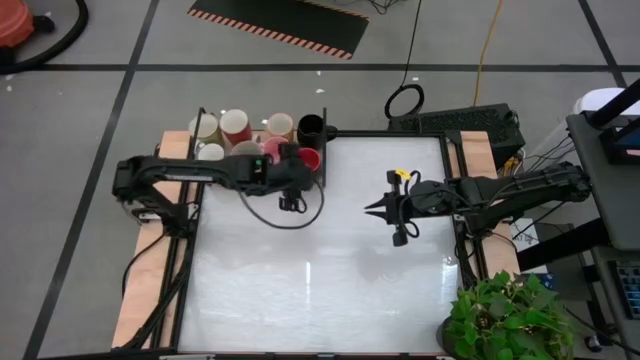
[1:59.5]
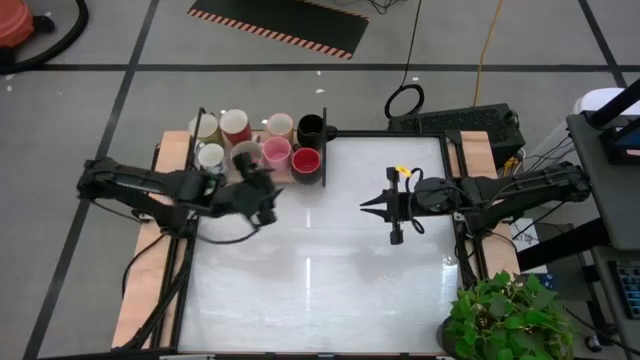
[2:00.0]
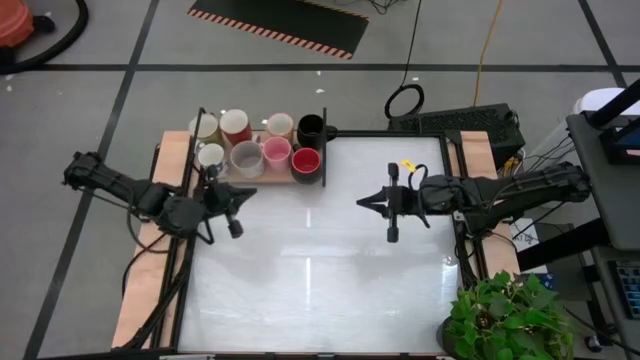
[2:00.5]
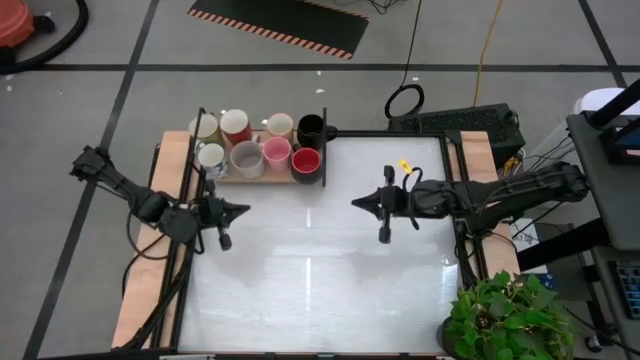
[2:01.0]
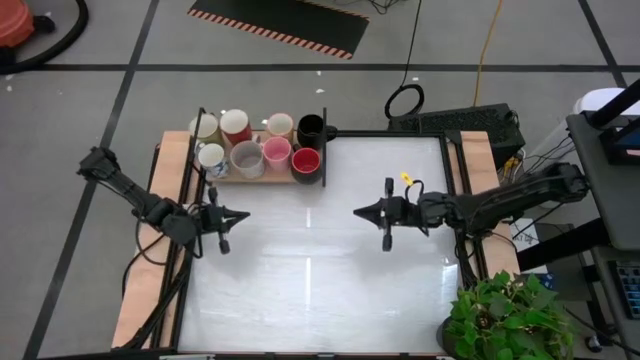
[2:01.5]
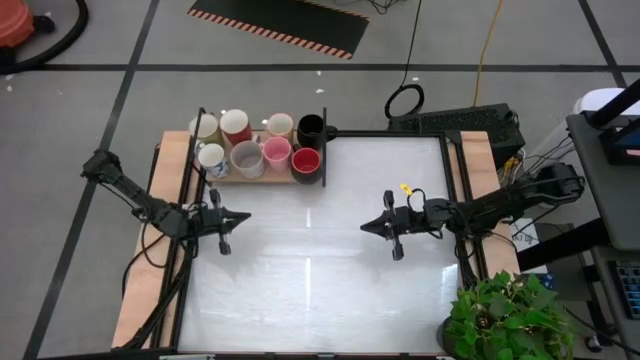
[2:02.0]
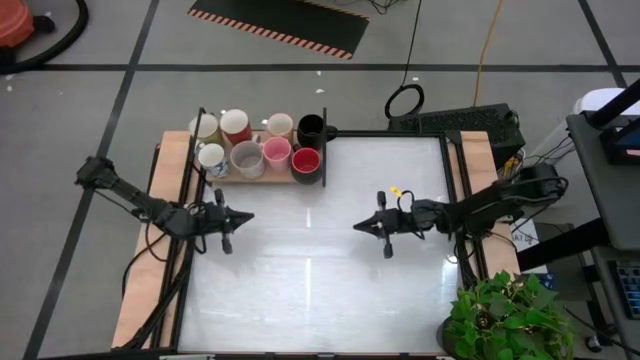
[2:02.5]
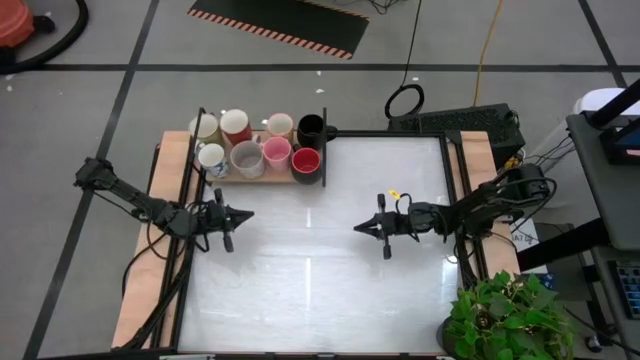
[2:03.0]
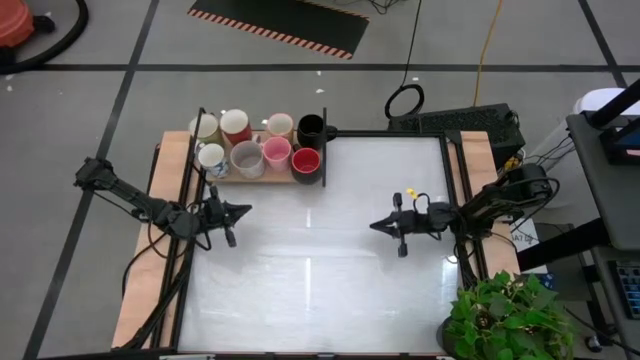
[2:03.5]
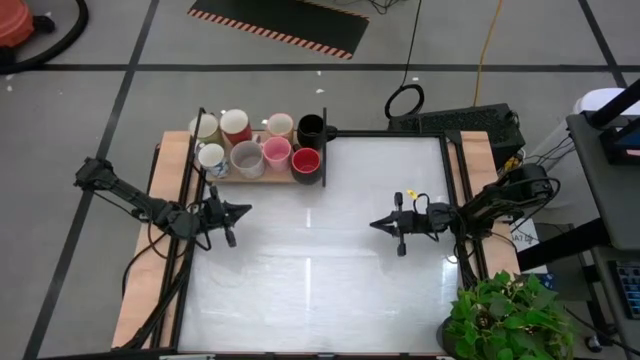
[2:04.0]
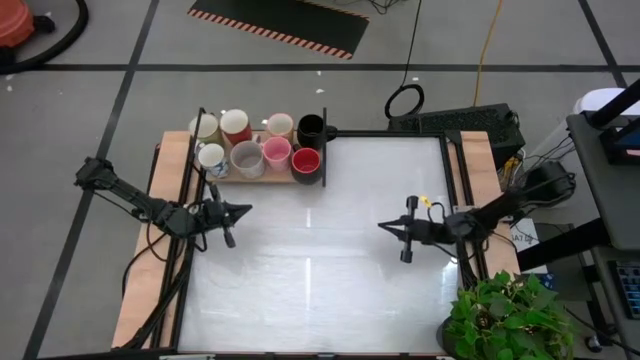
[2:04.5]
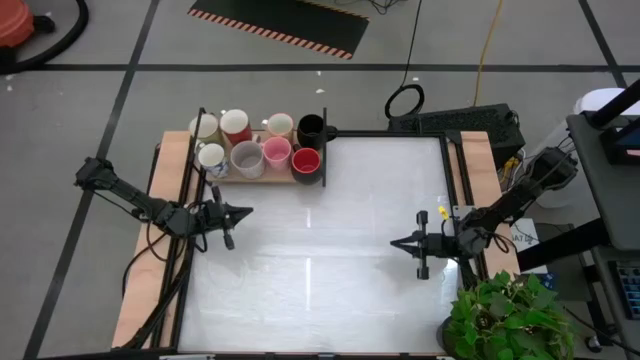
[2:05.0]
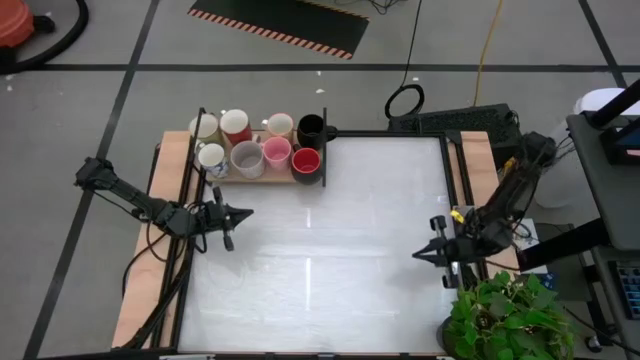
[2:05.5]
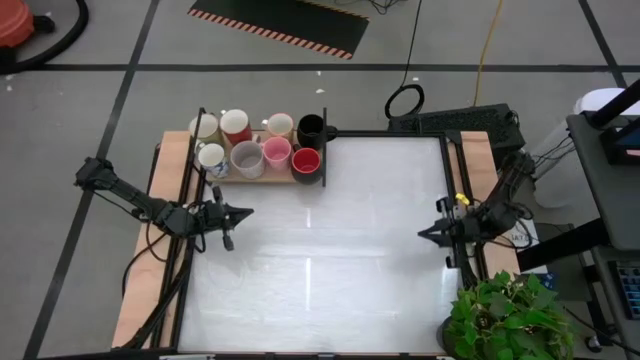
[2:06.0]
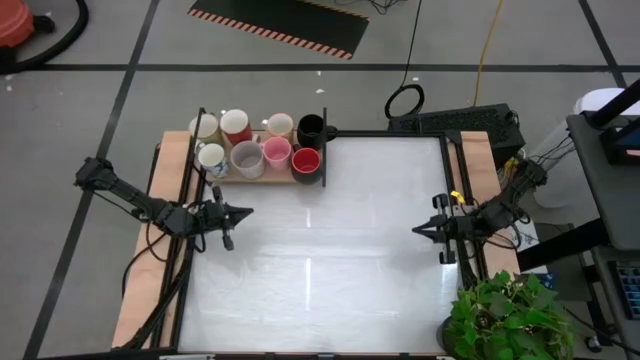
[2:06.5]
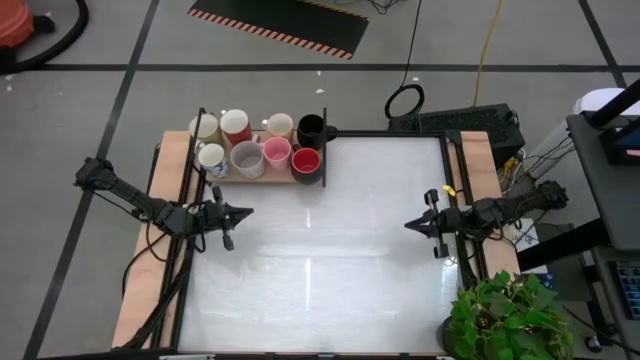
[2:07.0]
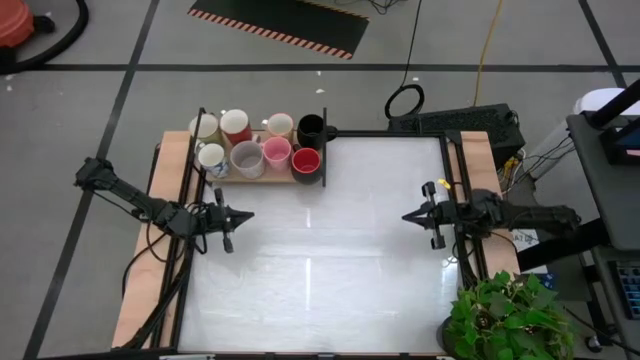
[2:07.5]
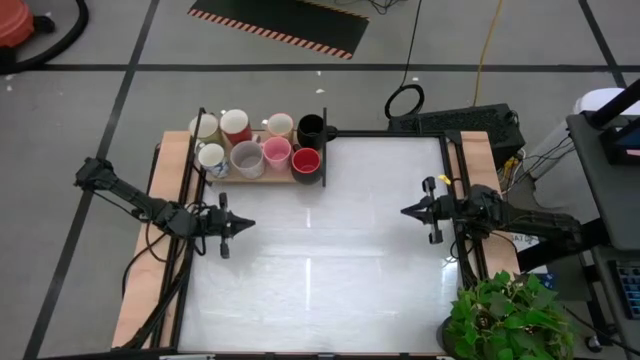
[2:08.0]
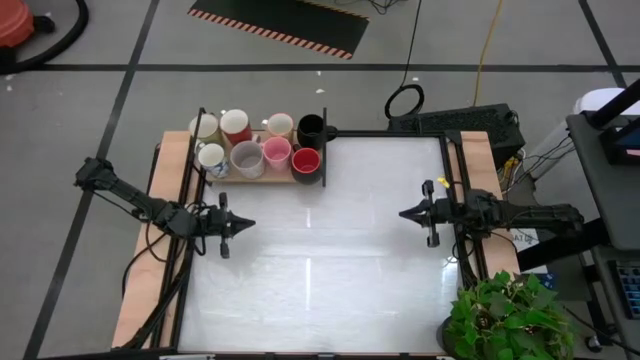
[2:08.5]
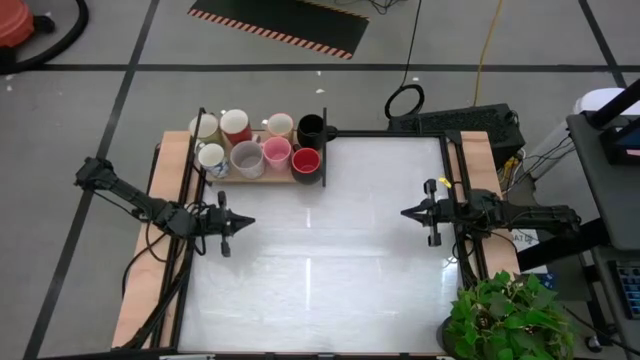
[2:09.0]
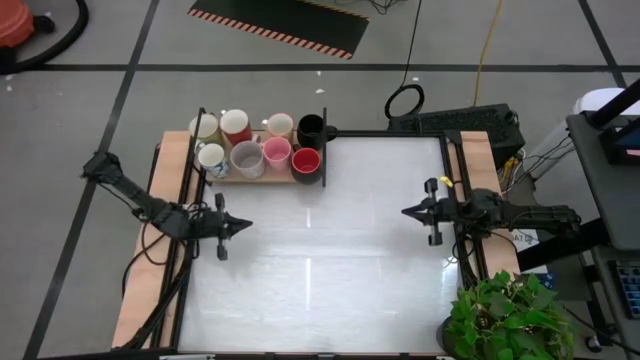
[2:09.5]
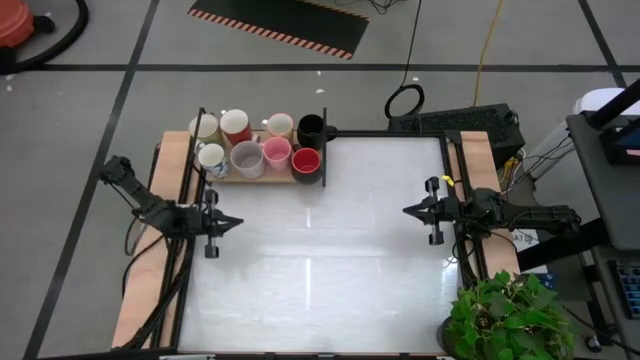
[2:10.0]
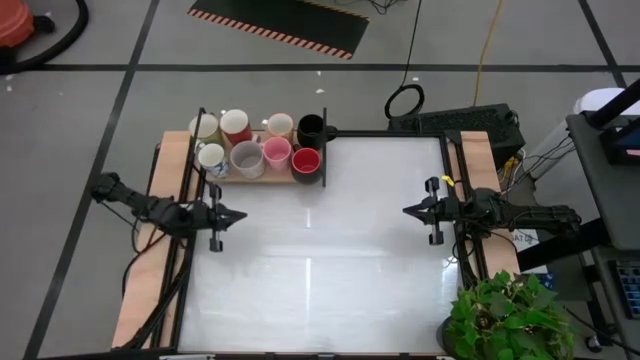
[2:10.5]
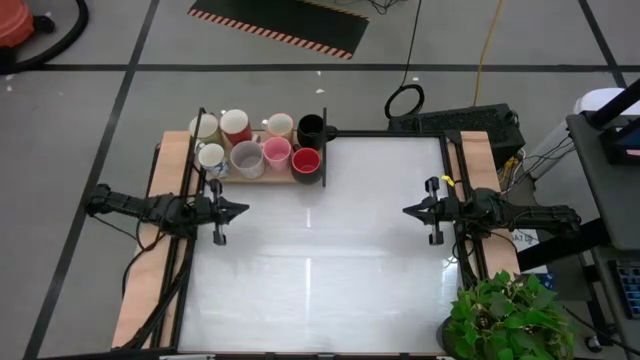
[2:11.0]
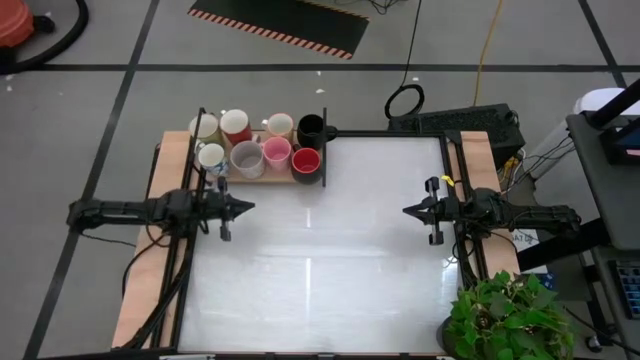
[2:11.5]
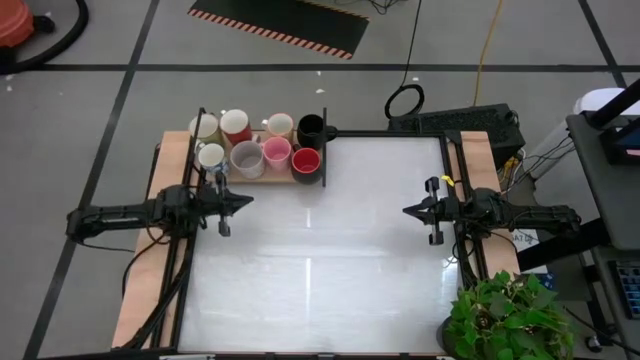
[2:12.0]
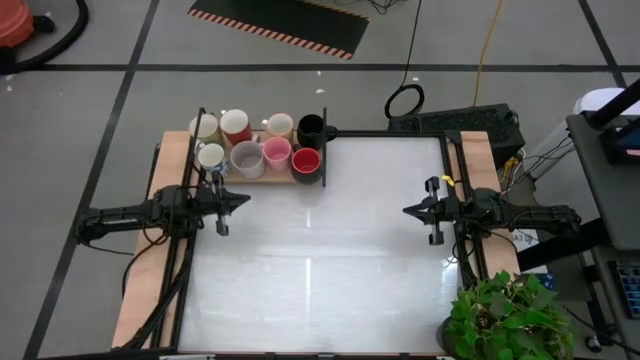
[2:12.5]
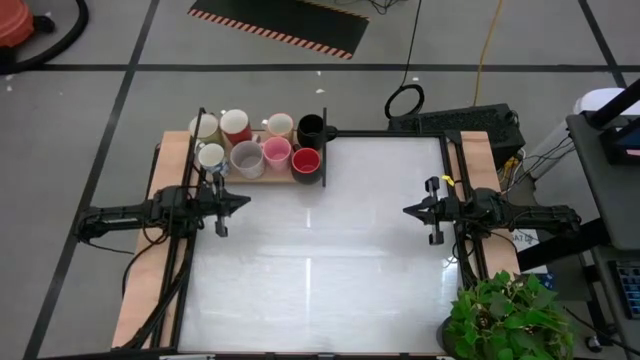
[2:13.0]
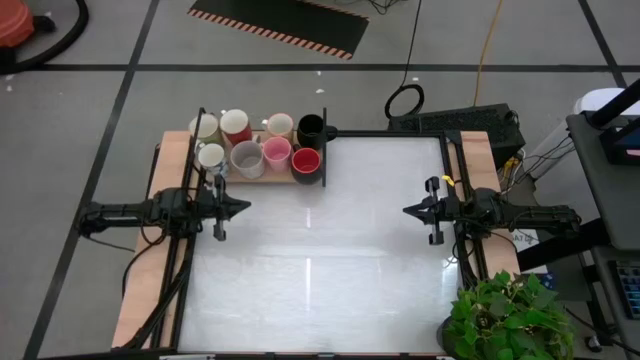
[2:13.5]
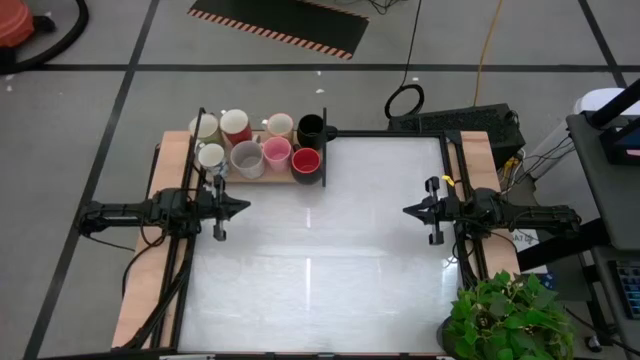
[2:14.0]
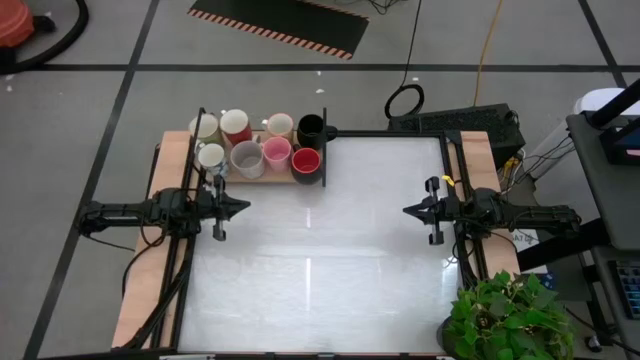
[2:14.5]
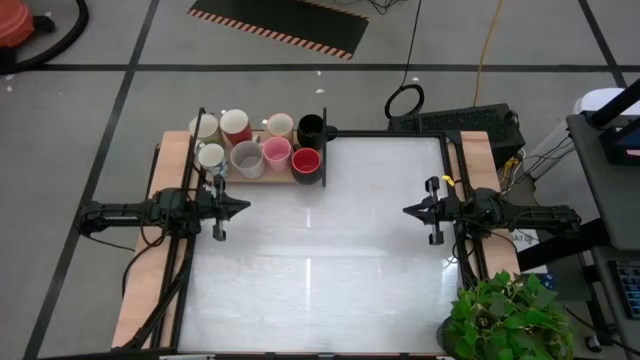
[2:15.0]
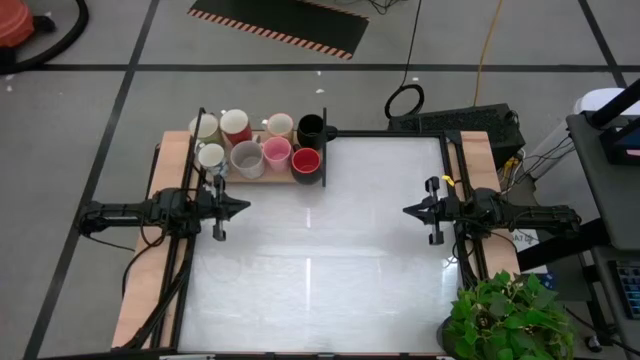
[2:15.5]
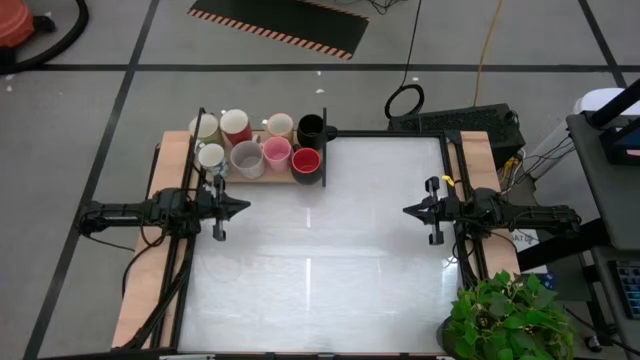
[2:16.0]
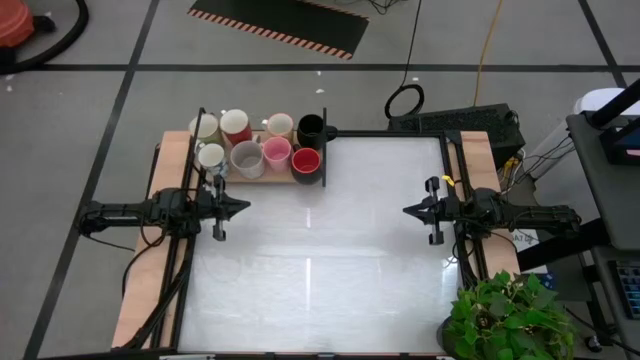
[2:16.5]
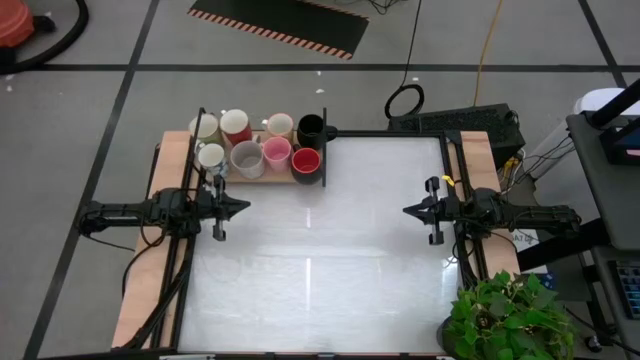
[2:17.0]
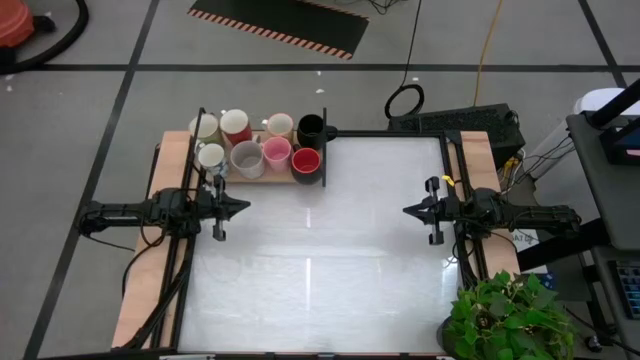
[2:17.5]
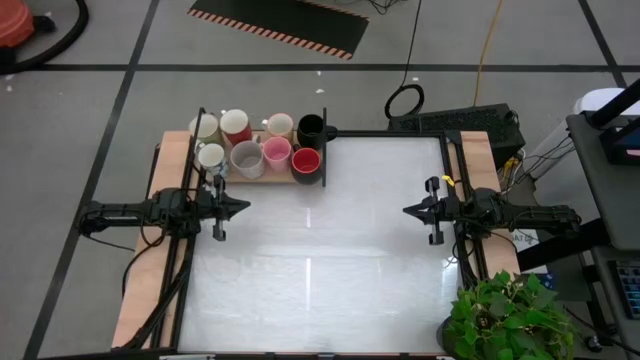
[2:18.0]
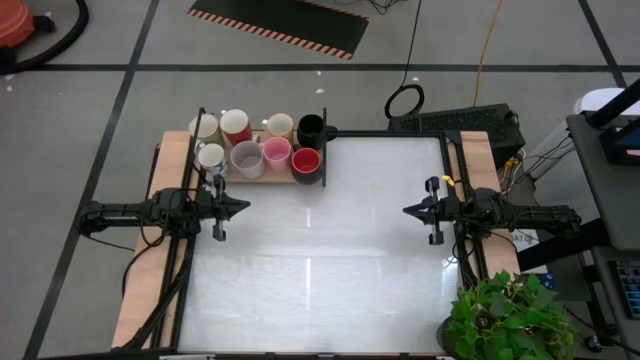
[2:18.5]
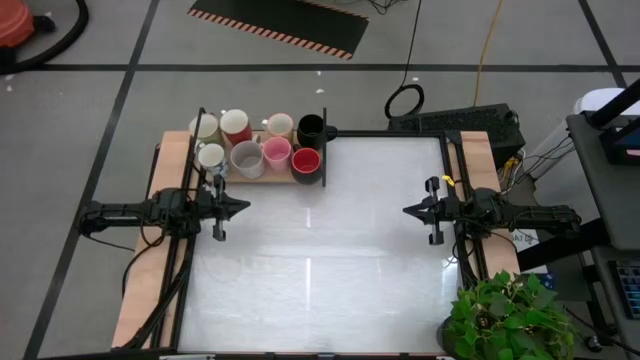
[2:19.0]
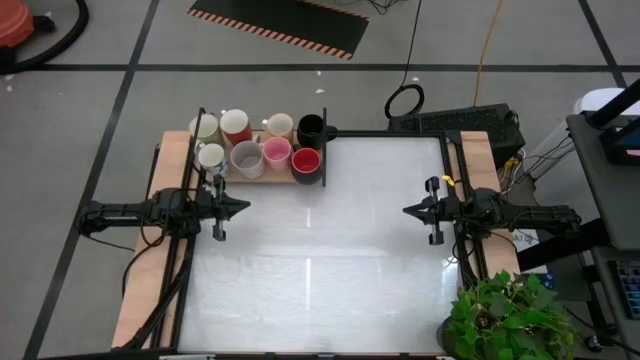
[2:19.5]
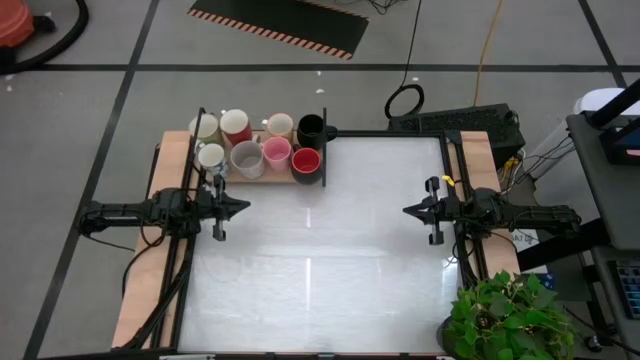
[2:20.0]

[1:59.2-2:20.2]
Task: Place coffee mugs
Return to Home Position

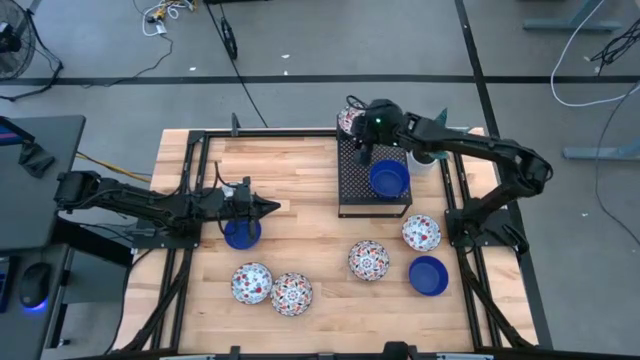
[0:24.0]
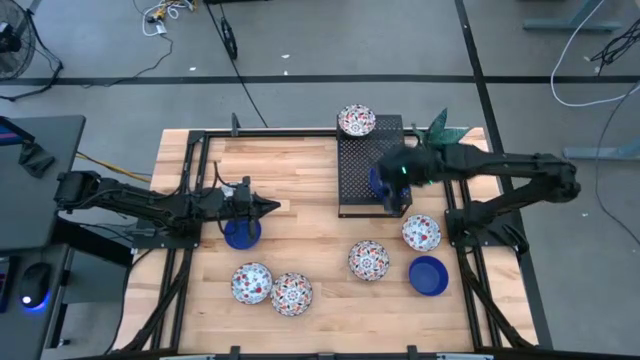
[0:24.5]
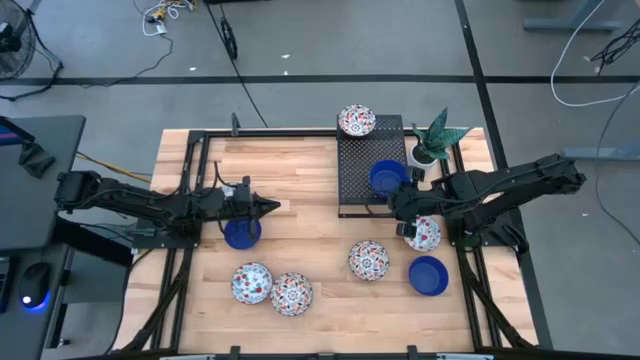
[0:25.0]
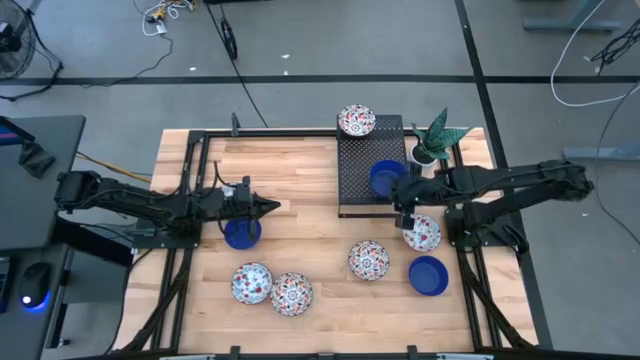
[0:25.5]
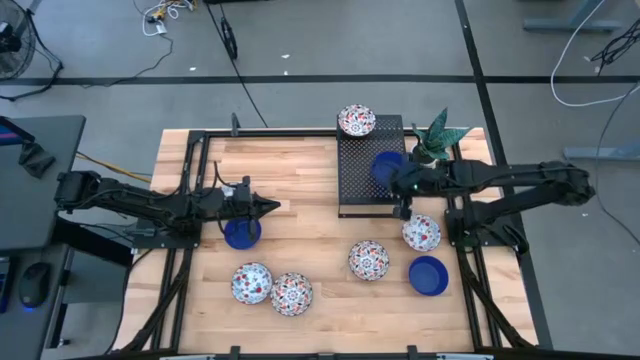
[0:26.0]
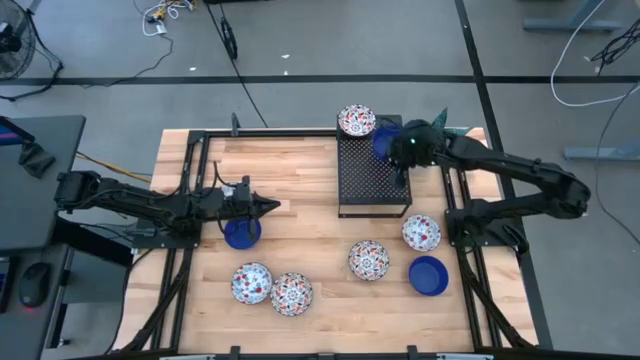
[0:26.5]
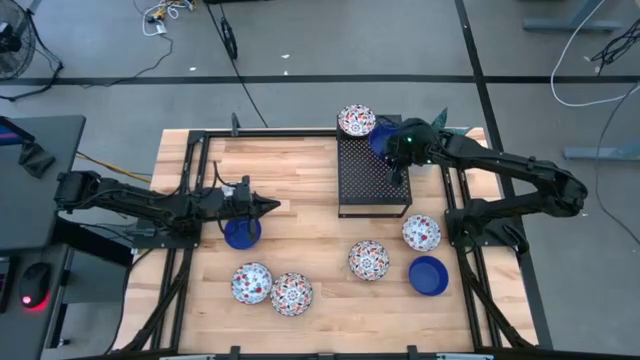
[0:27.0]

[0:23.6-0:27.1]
Task: Pick & Place Mini bowls
Adjust the blue bowl on the shelf
